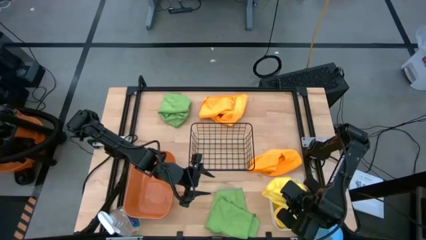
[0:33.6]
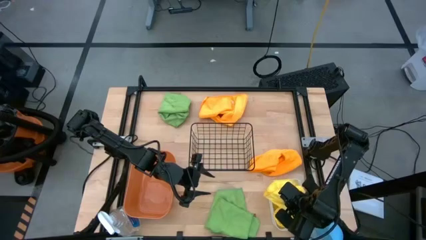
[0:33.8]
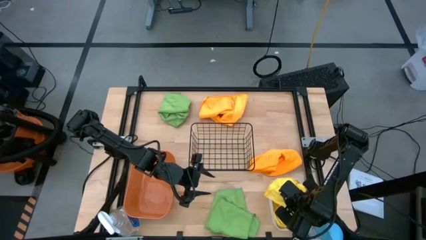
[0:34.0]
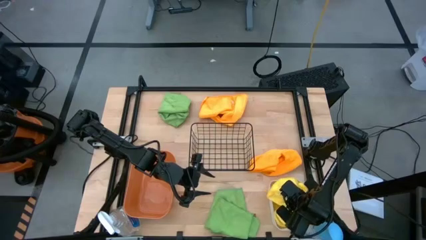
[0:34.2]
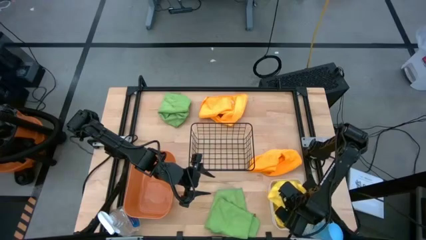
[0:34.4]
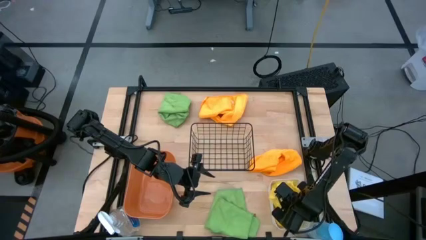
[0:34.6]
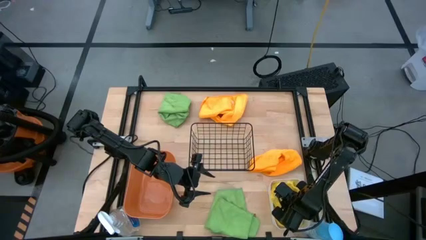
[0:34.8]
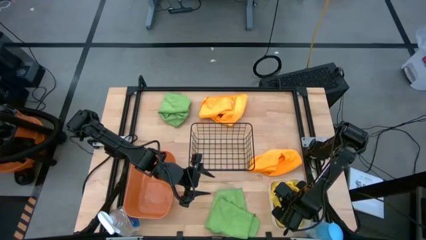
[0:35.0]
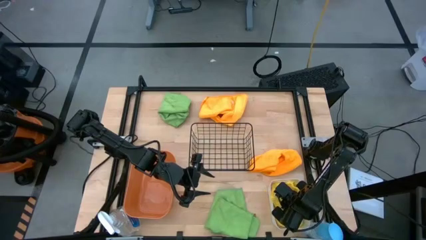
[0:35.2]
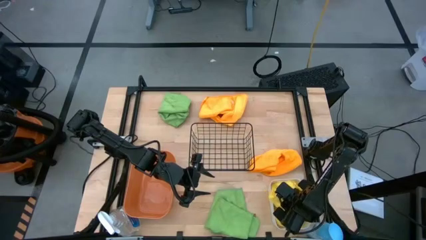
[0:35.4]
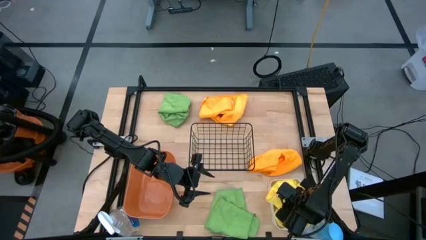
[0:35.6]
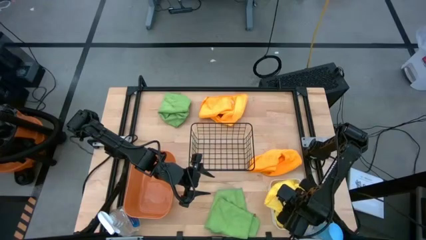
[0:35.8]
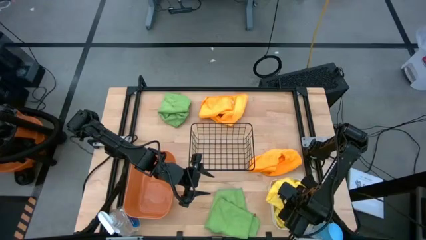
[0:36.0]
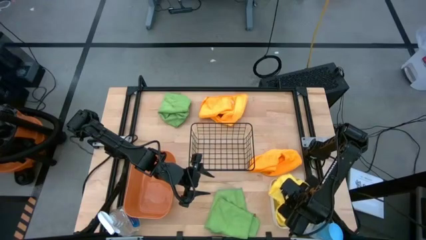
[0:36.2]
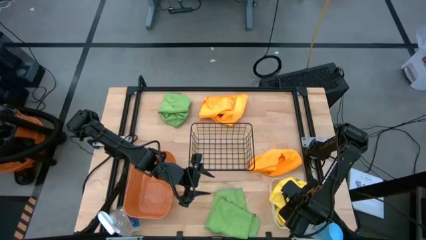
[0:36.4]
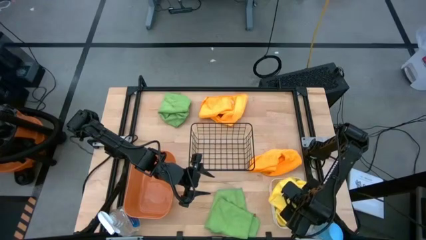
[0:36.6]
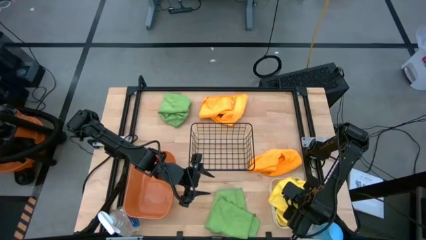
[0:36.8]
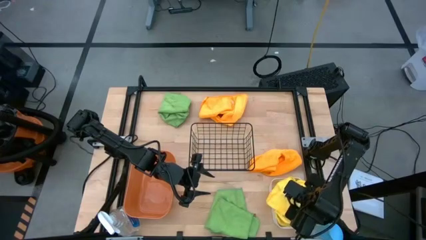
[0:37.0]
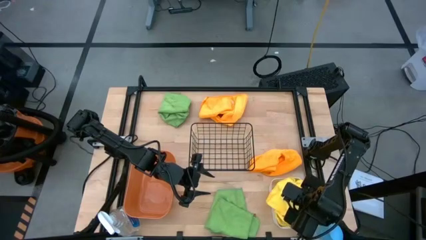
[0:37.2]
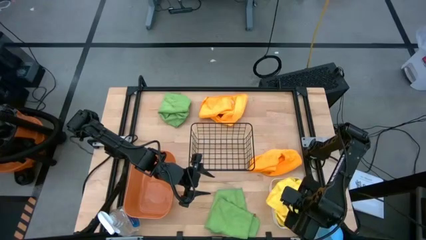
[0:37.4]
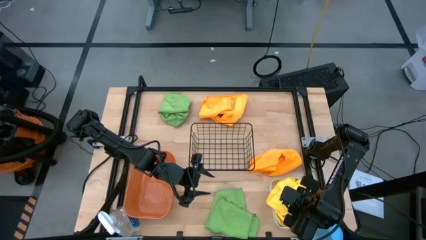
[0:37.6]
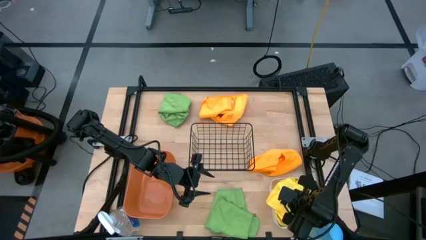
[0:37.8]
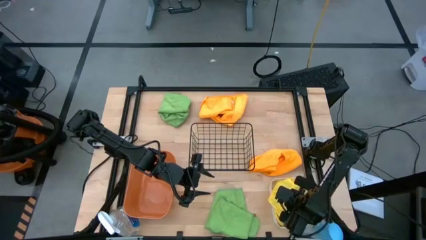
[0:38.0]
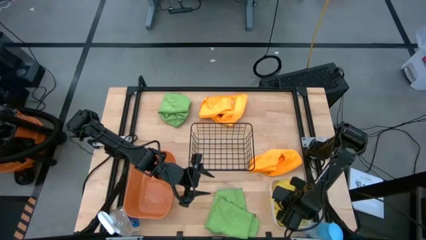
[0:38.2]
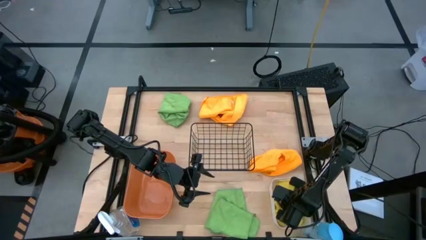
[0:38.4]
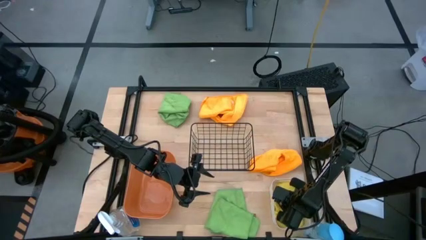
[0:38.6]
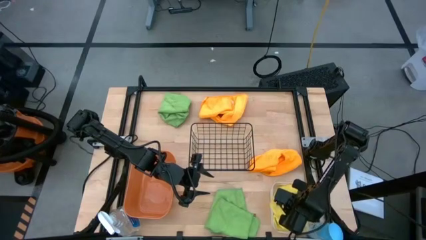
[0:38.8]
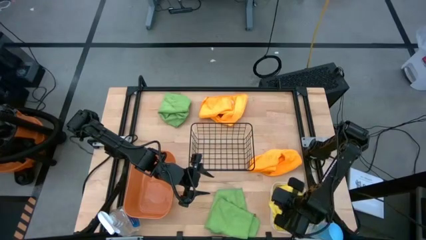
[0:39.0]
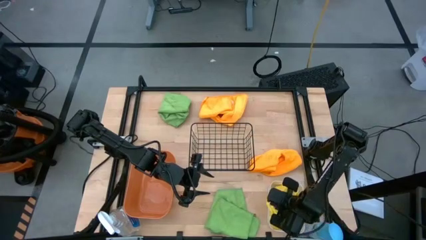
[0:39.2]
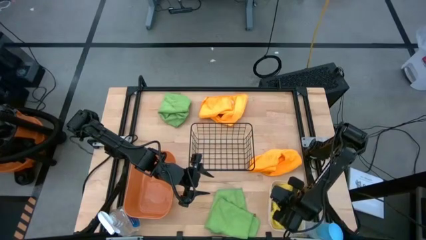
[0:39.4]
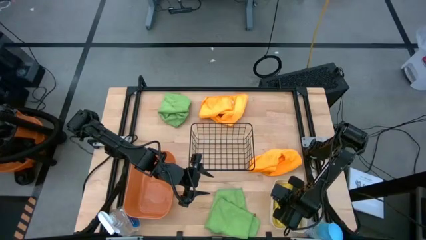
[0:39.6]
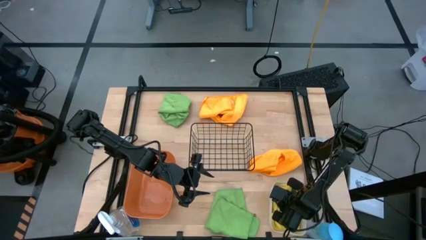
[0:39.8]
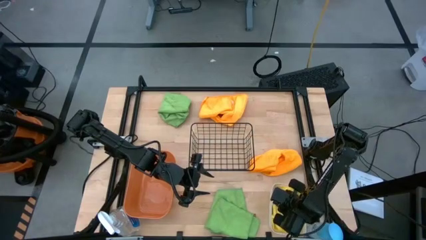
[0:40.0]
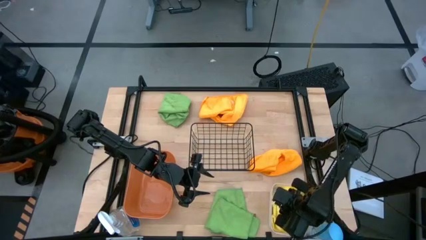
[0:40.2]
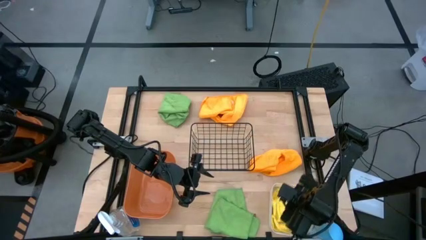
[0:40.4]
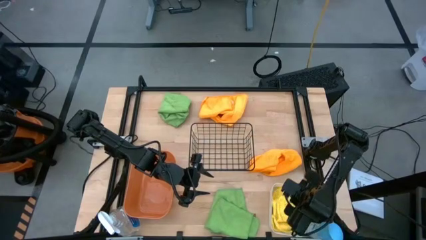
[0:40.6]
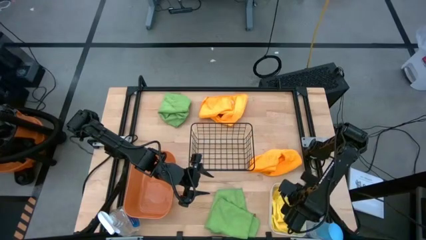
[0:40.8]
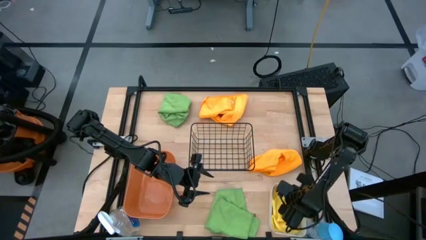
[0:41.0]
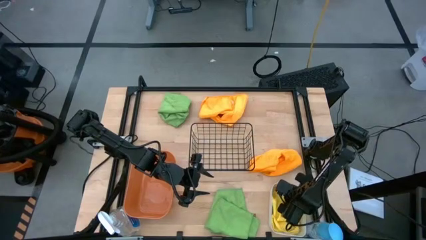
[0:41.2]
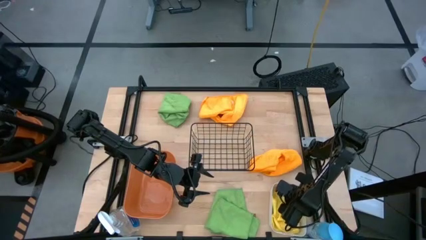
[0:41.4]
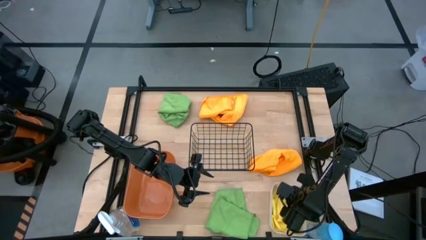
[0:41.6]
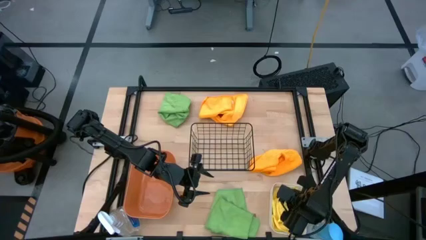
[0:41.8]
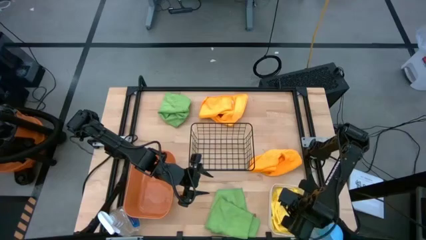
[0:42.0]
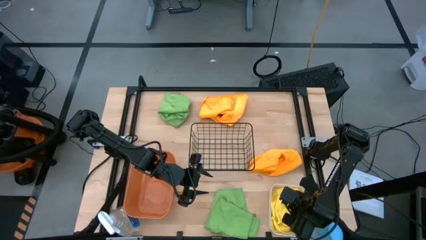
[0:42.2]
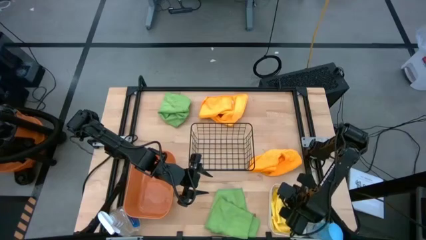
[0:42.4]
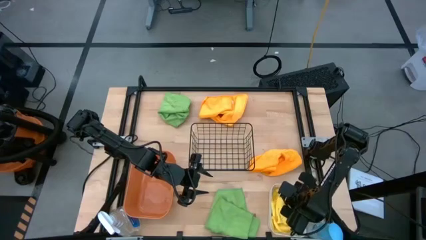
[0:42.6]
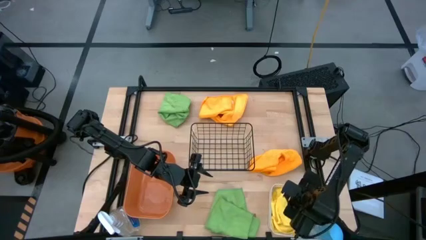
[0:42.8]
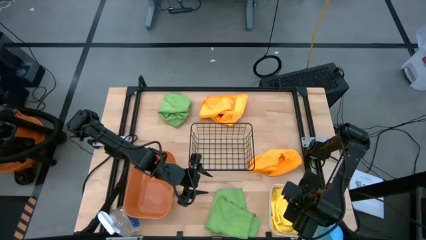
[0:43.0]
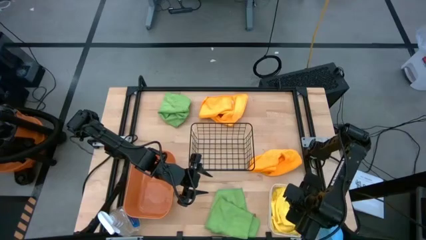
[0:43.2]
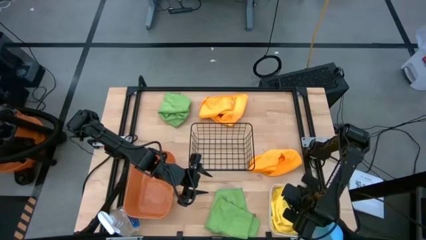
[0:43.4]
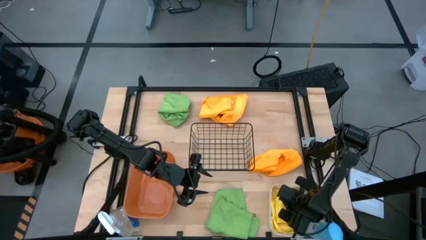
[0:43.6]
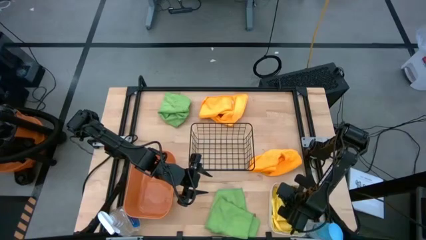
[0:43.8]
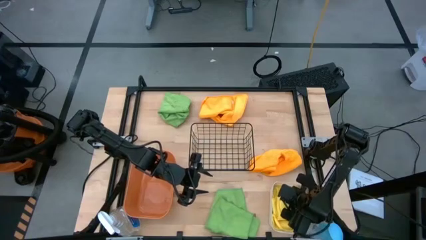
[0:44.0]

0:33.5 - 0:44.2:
Task: Sort microfiber towel by color & place in baskets
Put the yellow microfiber cloth into the white bin

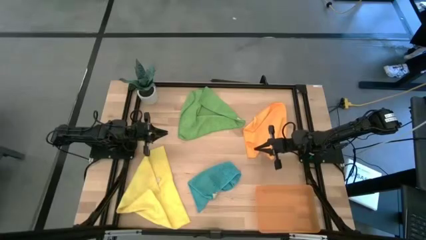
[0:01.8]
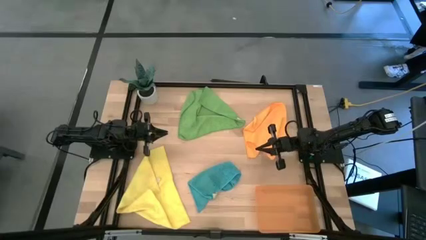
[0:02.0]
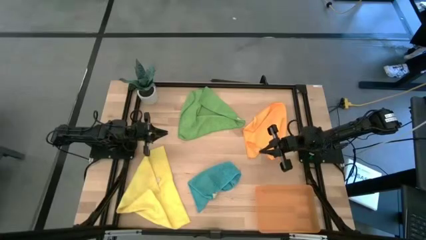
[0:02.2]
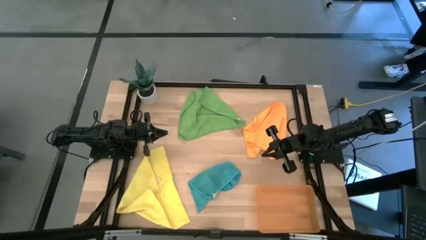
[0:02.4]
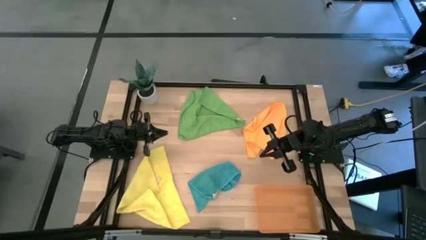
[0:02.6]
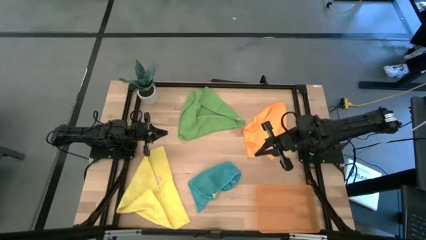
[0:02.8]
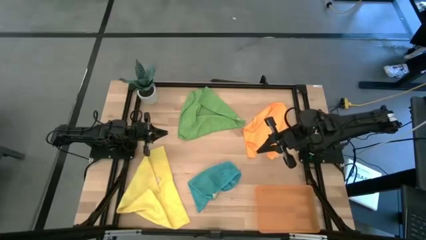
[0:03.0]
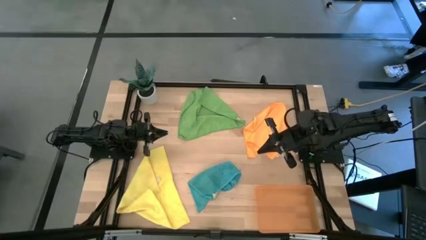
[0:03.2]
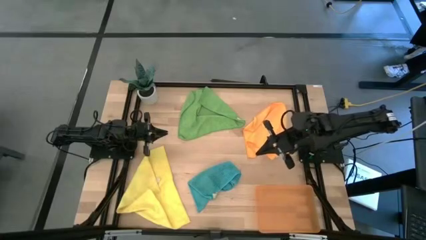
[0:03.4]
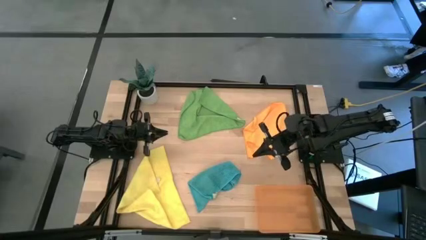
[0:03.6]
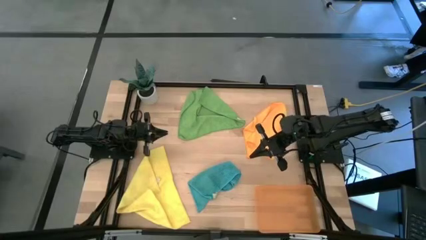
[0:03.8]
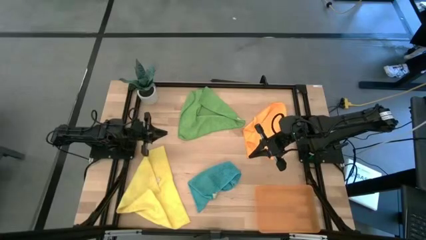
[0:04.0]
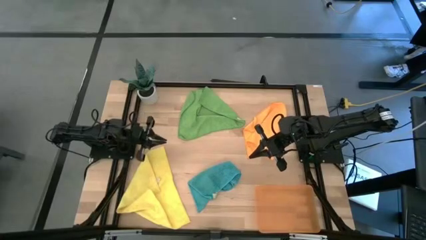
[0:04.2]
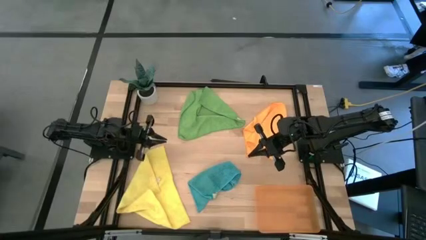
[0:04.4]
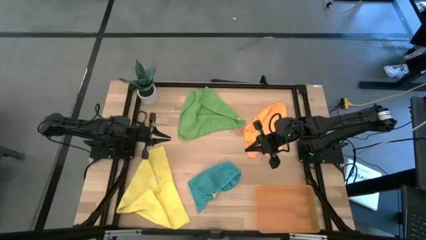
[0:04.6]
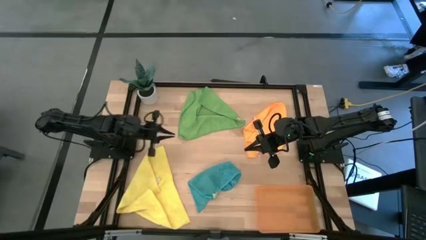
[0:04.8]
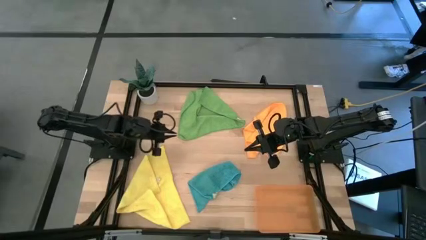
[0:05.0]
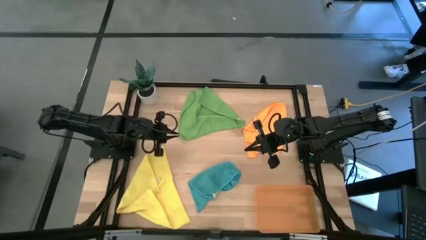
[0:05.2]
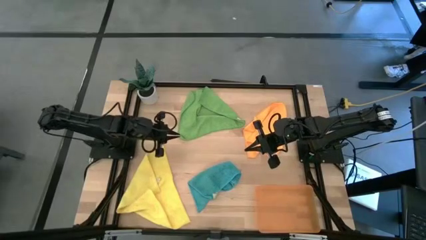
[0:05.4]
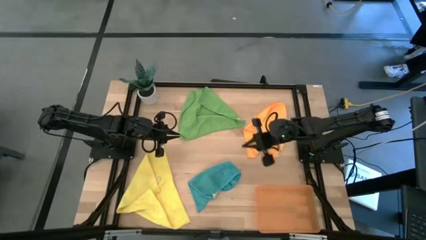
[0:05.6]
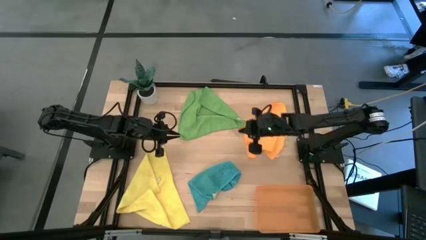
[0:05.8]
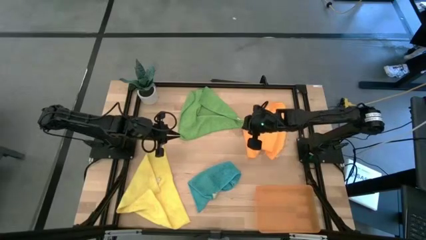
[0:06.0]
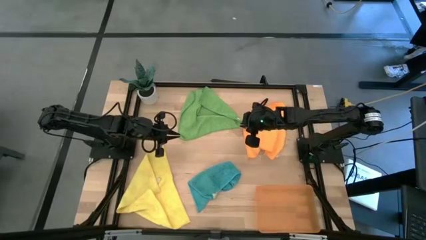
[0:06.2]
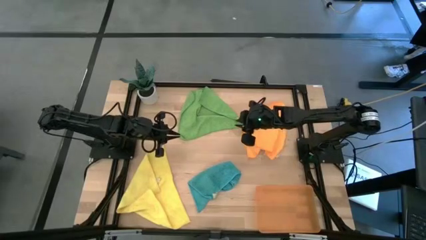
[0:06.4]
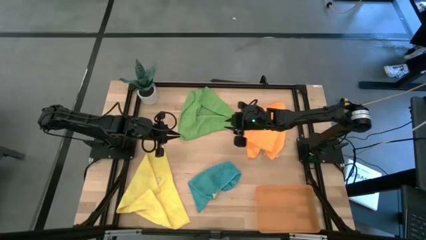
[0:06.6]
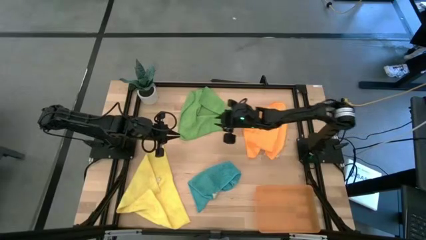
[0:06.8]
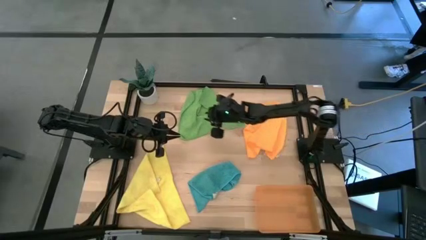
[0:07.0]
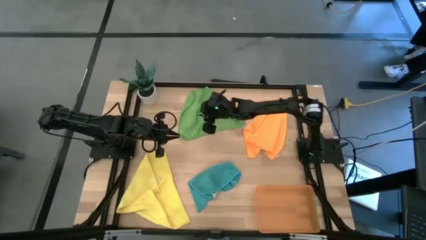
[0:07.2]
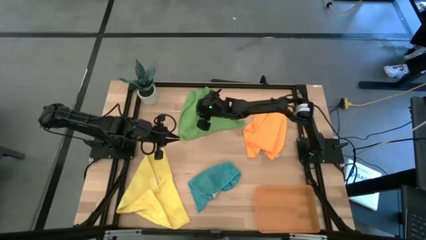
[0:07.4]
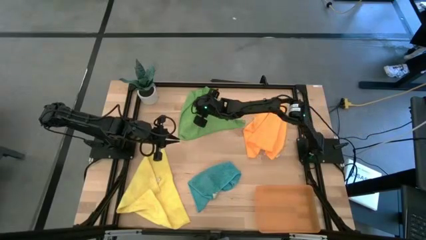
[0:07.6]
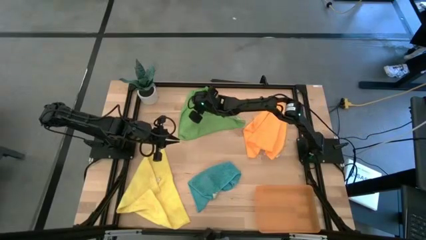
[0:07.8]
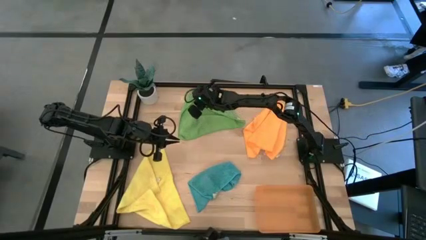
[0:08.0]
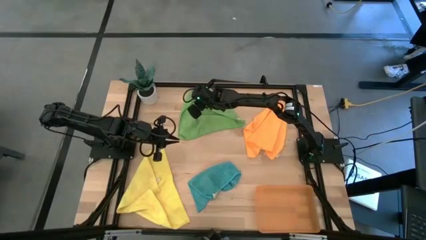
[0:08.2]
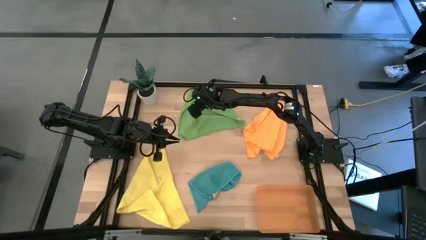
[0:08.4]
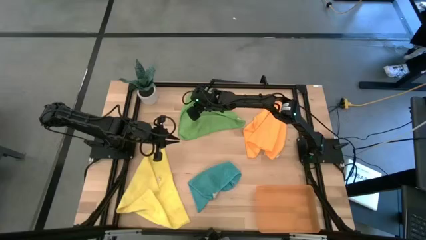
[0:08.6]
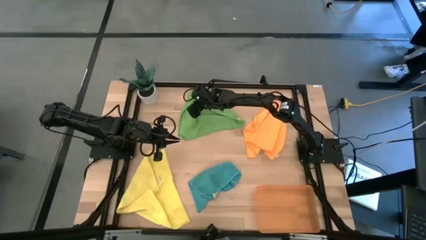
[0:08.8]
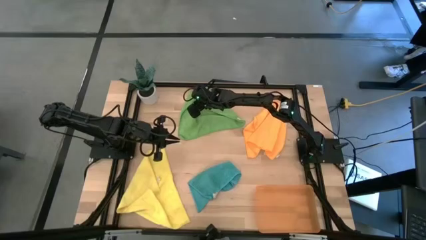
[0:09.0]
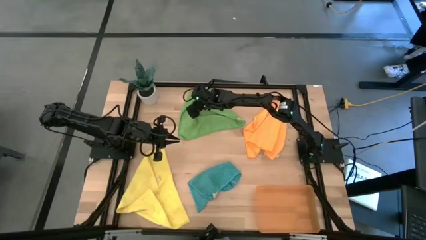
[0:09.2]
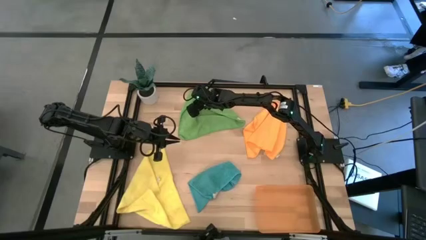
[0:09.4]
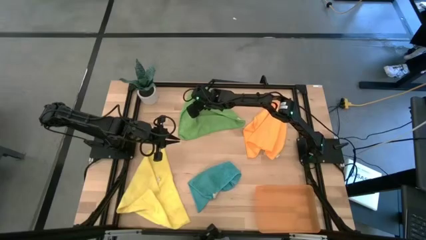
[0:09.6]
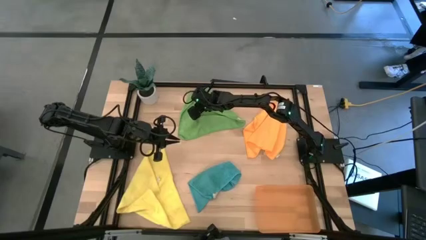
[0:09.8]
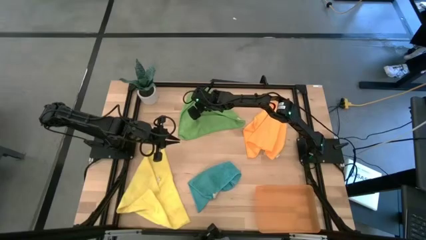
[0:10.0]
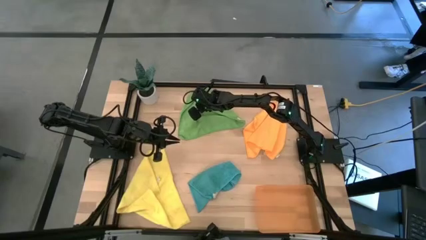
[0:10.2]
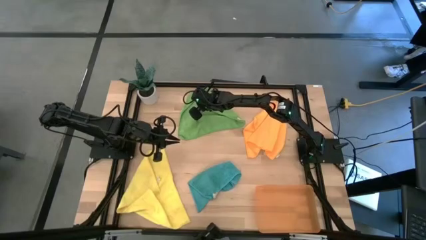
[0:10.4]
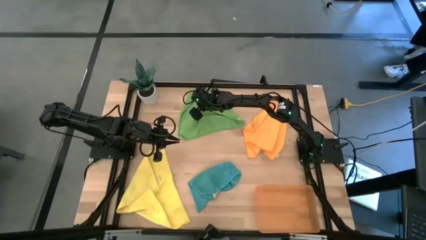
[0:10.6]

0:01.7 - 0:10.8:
Task: Roll microfiber towels into tight, uniform cylinder then place into a basket
Roll the green microfiber towel
